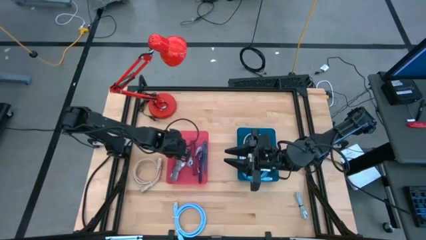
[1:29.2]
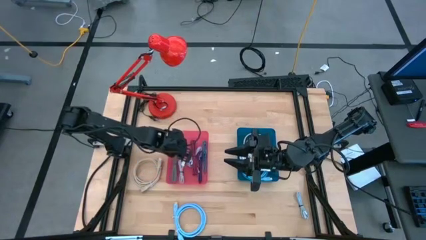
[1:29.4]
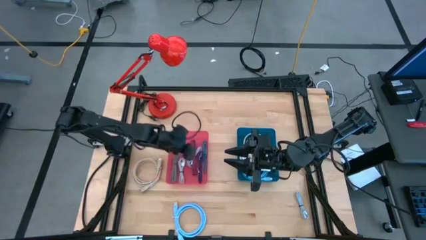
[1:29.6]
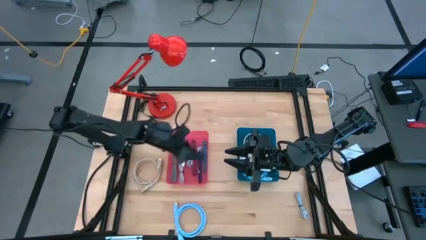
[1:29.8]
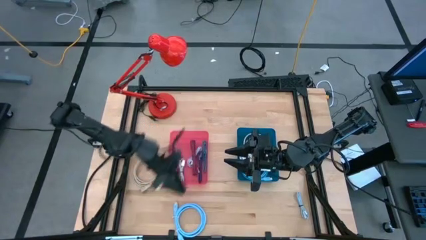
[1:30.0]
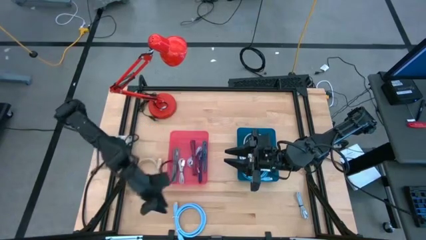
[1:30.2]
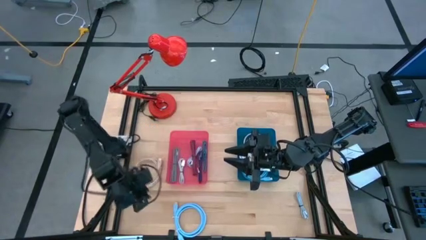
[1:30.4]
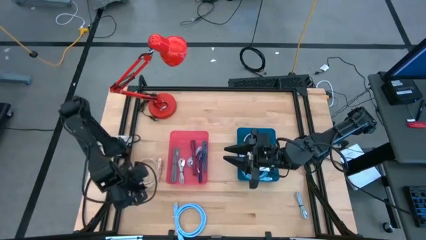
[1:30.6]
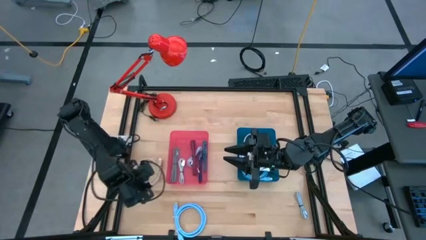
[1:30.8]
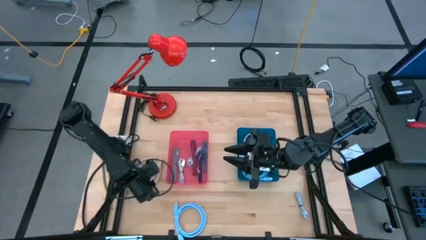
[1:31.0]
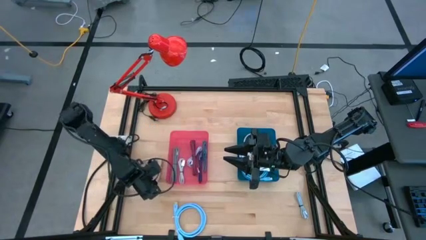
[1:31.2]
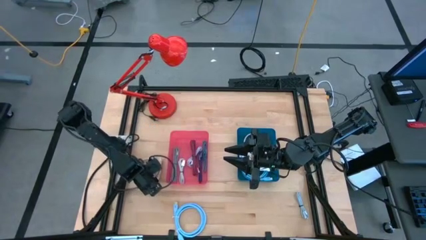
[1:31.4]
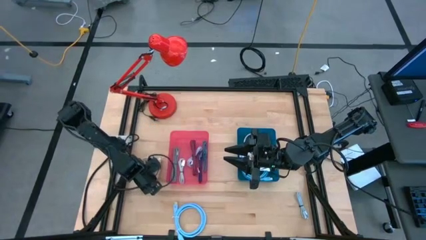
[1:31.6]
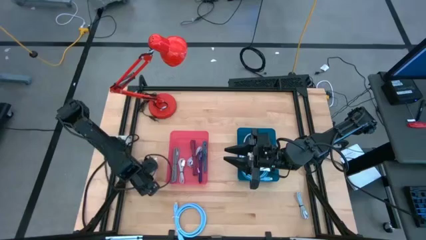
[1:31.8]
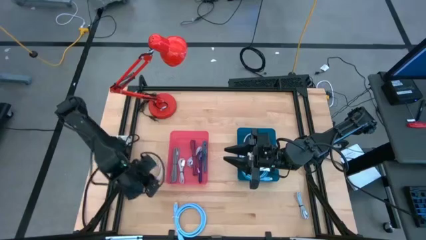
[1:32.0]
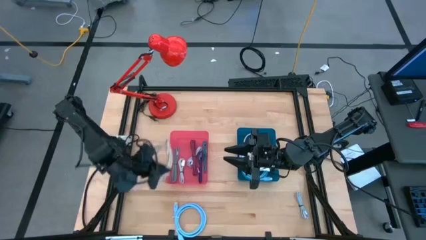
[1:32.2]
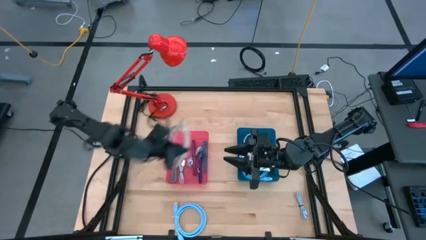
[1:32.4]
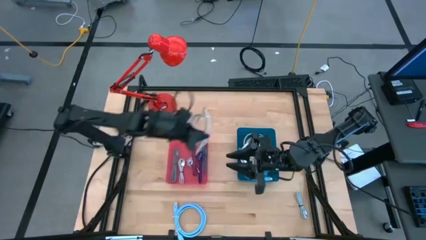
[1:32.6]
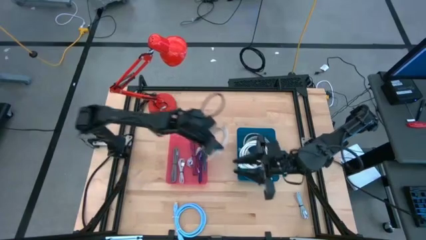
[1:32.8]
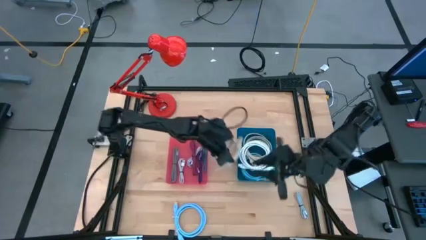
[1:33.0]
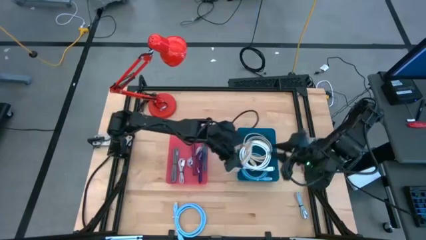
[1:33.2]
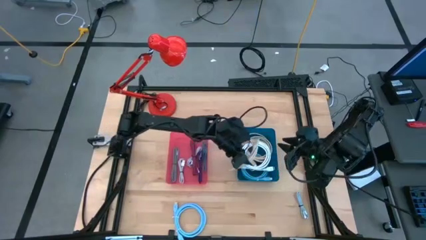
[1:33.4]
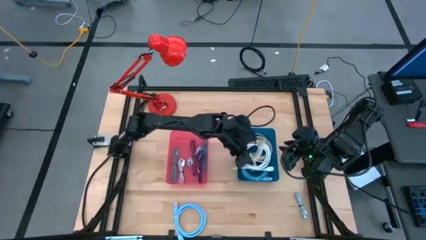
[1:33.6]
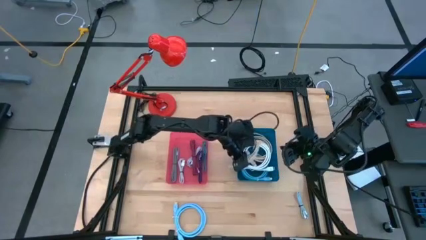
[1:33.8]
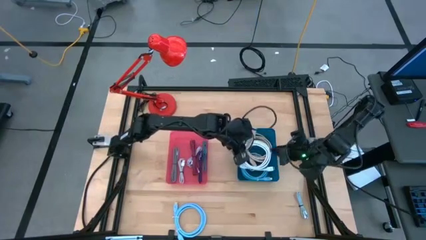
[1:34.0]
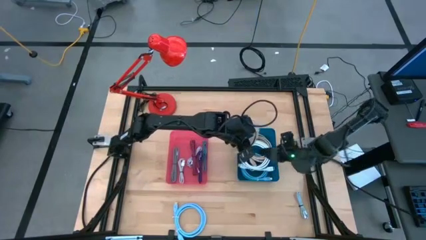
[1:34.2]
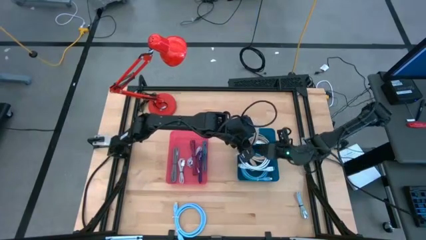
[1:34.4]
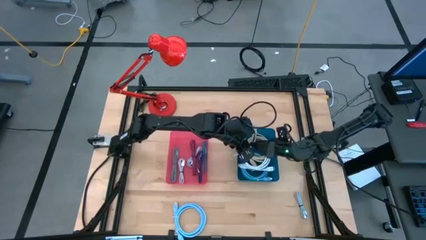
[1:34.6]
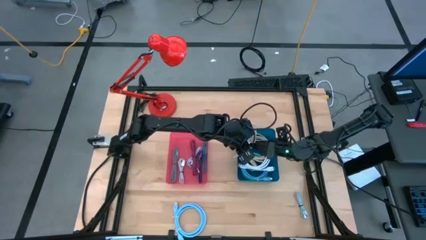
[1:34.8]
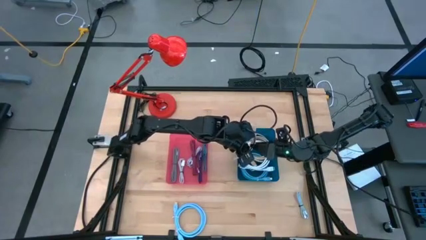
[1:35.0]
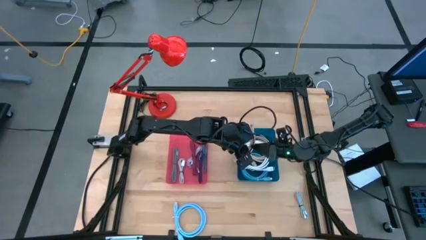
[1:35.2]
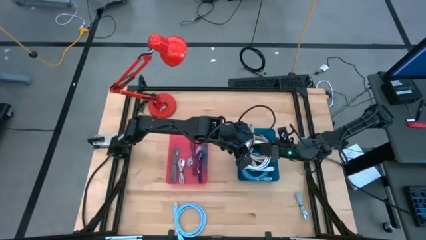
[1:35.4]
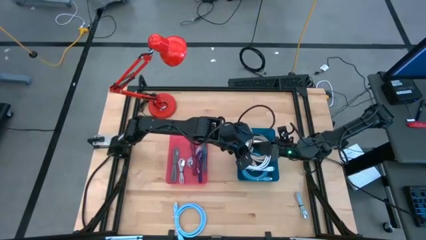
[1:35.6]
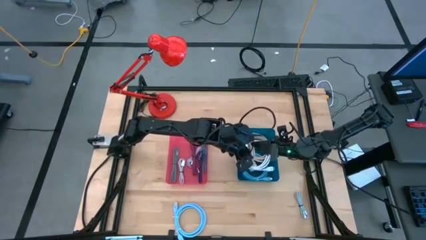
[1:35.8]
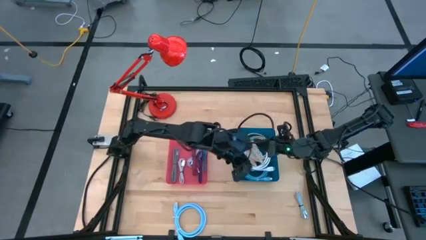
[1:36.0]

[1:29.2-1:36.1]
Task: Pick & Place USB Port
Put the light brown HDMI cable into the blue bin

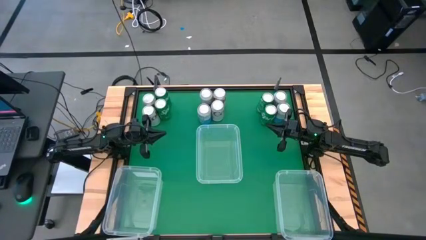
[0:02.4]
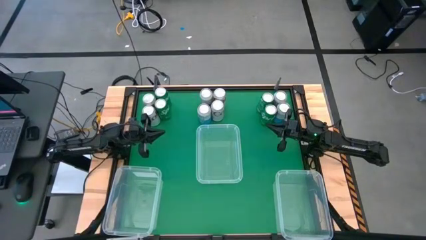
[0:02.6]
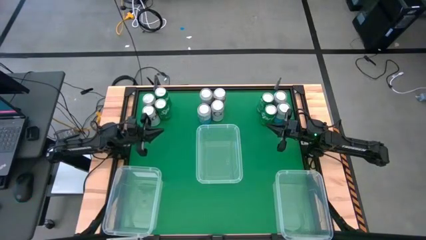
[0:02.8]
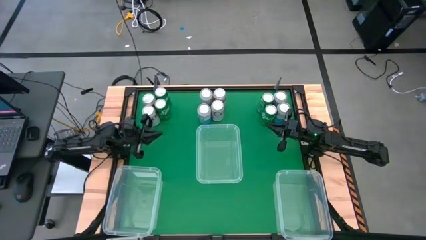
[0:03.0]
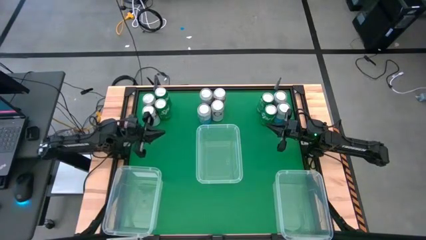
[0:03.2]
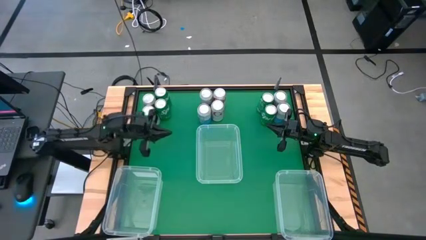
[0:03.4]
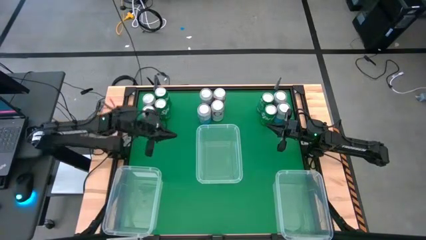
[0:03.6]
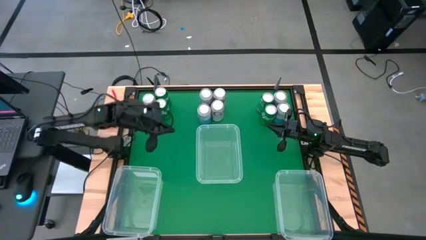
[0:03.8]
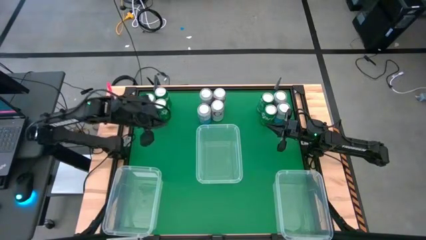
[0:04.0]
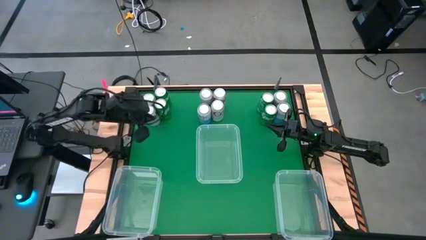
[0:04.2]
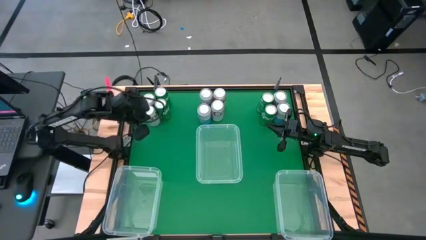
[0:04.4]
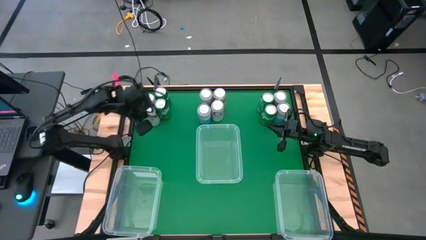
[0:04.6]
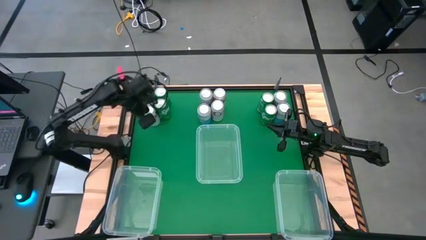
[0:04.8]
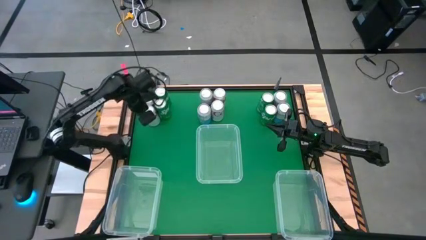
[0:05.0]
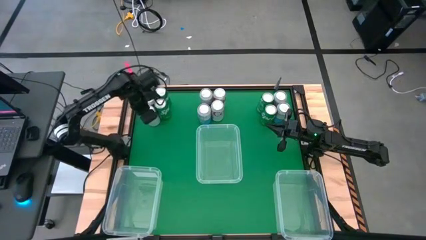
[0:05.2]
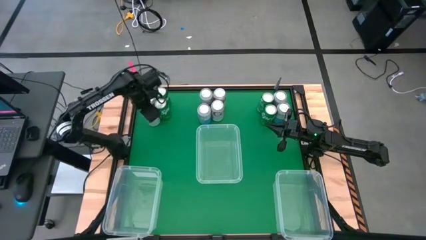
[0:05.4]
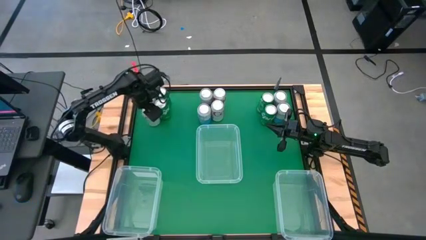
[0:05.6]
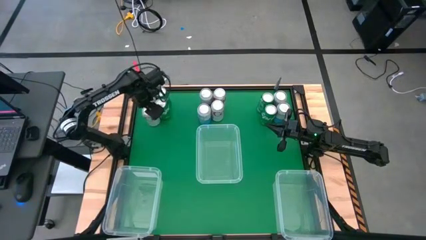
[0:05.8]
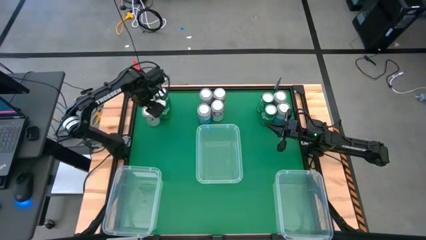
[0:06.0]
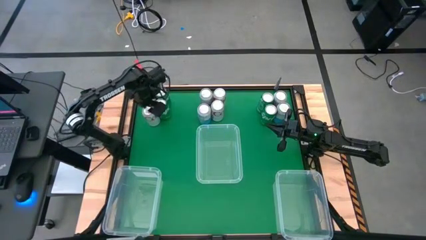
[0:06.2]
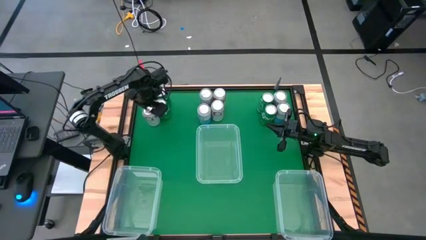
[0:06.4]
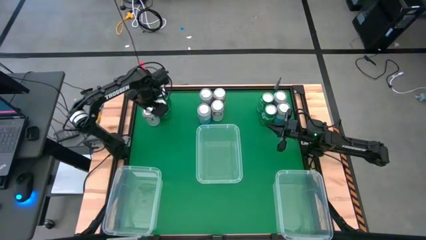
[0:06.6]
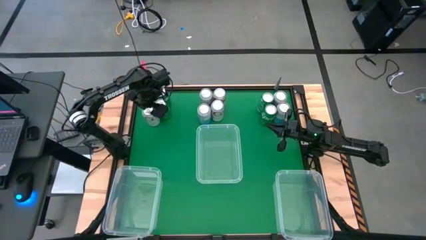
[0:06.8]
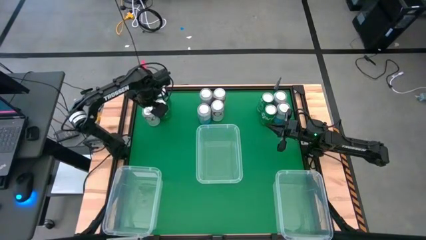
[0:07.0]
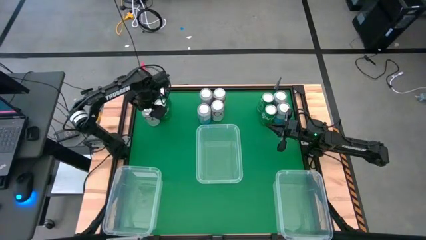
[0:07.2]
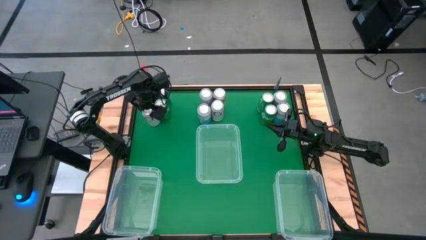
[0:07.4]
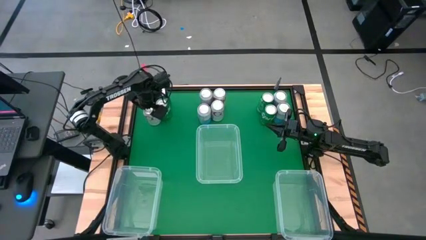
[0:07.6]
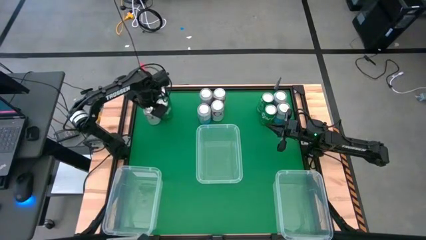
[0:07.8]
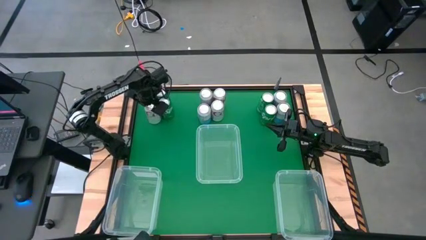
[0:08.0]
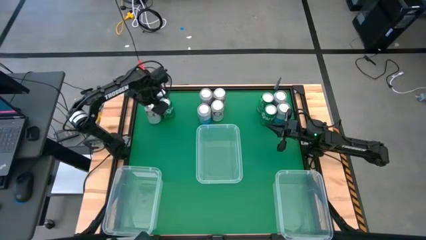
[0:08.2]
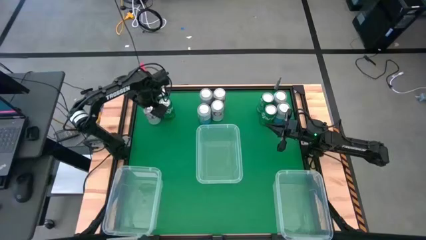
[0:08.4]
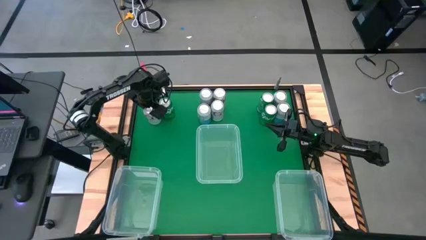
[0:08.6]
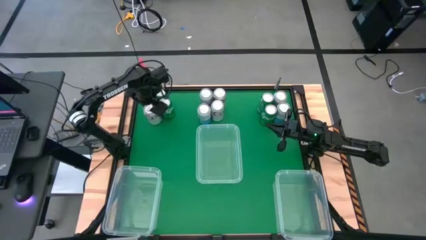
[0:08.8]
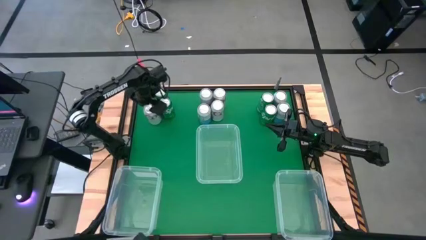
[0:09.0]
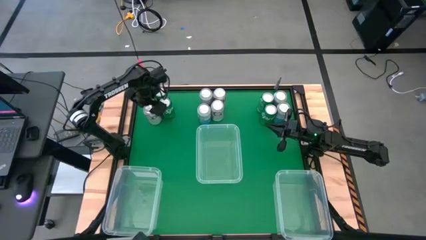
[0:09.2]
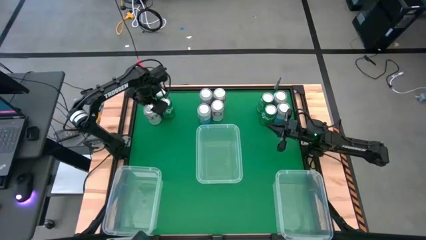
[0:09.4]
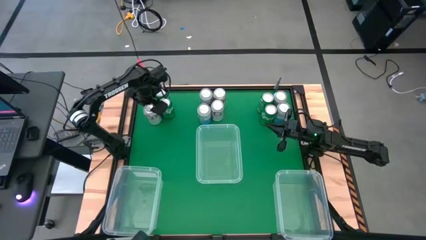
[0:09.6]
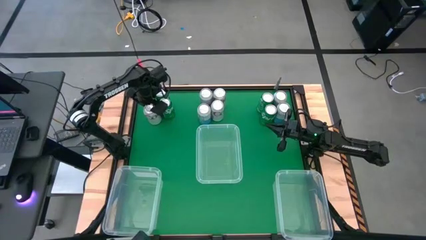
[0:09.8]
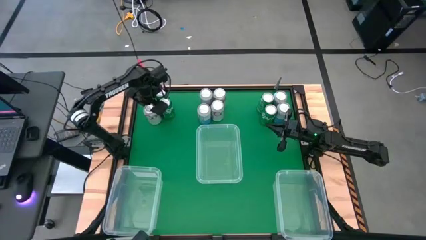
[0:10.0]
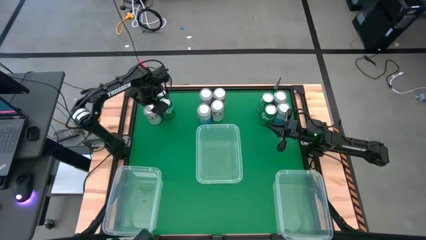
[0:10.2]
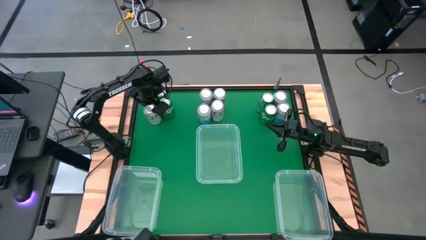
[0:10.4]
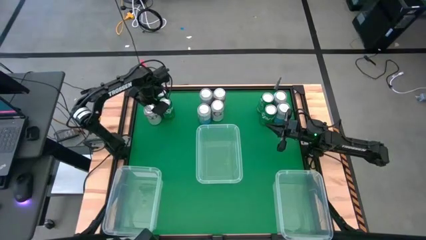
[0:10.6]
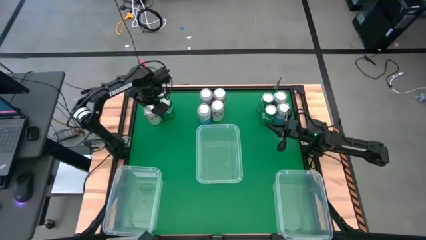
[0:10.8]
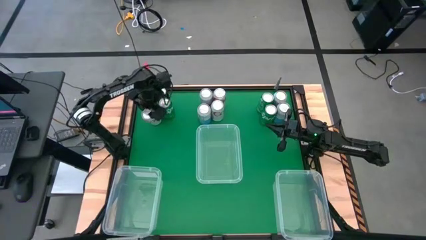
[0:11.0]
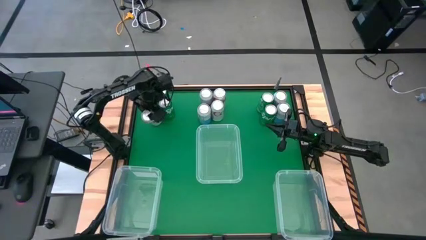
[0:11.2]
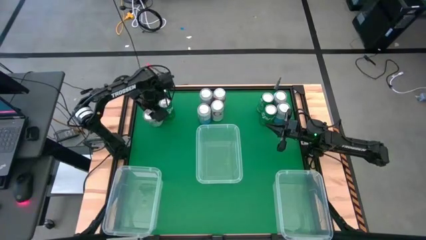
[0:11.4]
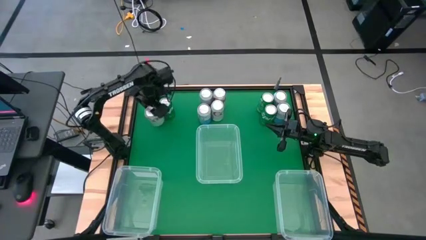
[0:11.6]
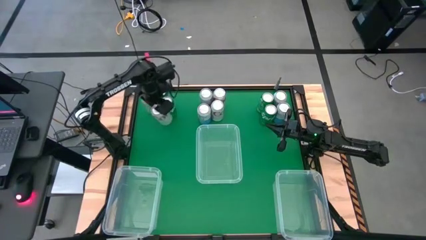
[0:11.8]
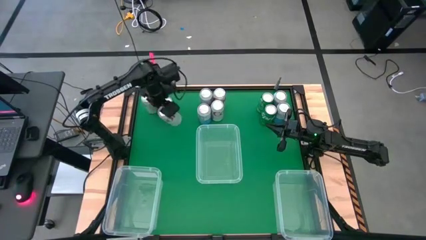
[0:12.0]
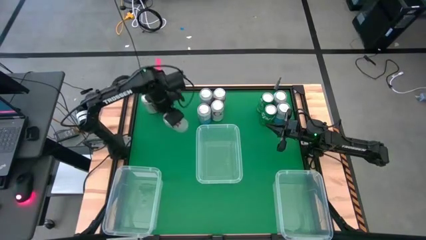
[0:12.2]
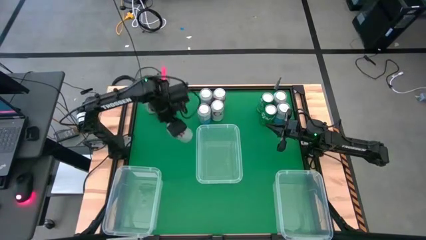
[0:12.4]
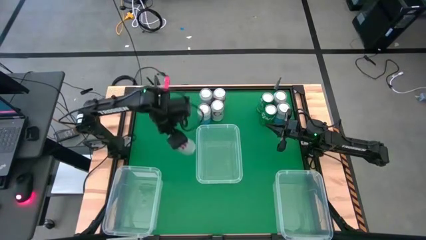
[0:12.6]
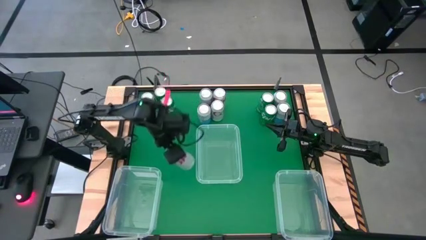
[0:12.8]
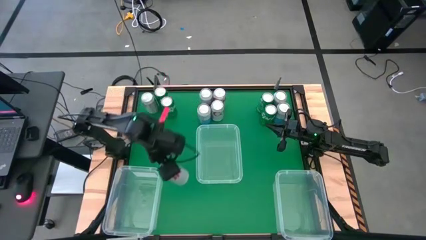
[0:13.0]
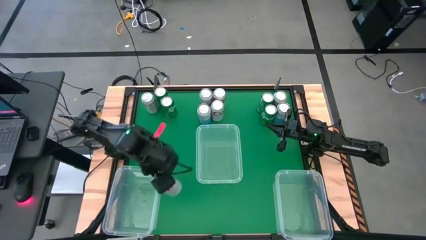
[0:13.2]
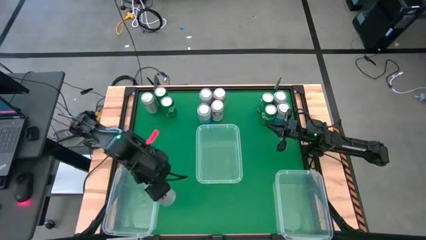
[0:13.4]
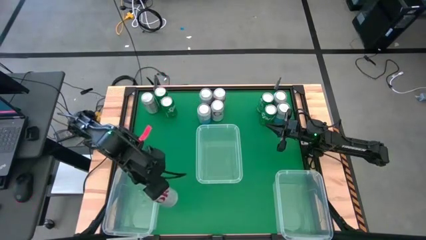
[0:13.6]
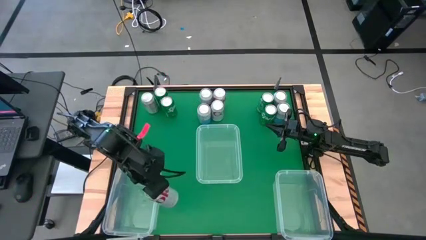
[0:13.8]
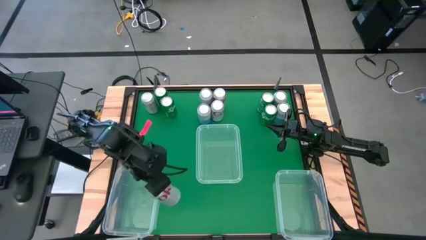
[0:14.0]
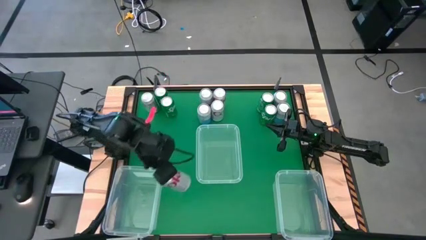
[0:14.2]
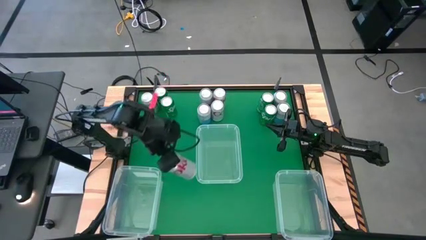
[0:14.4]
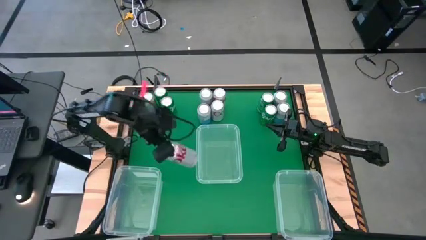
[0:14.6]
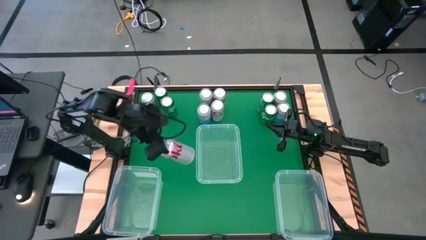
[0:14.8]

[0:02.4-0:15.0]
Task: Sort soda cans
Put the silver soda can into the bottom left transparent bin
